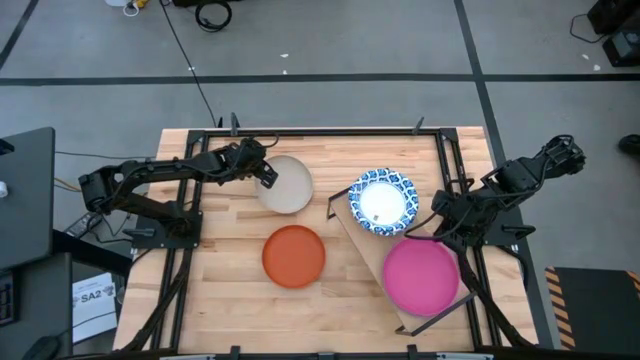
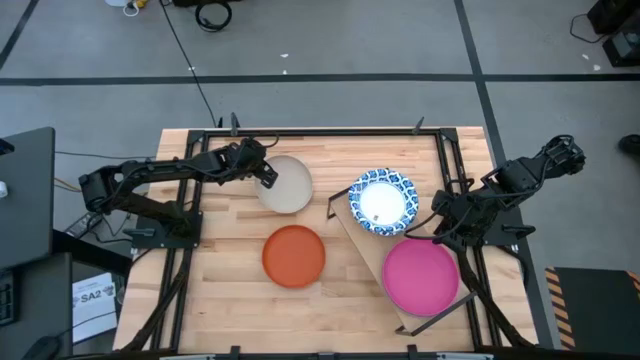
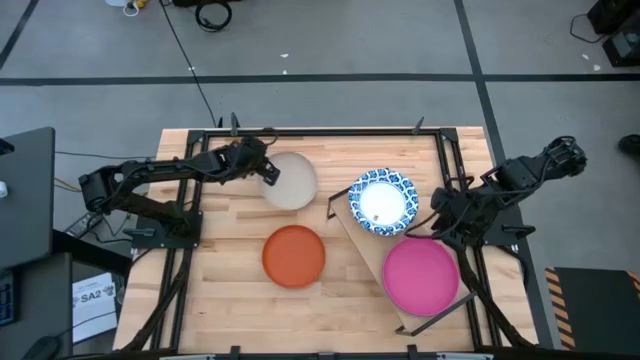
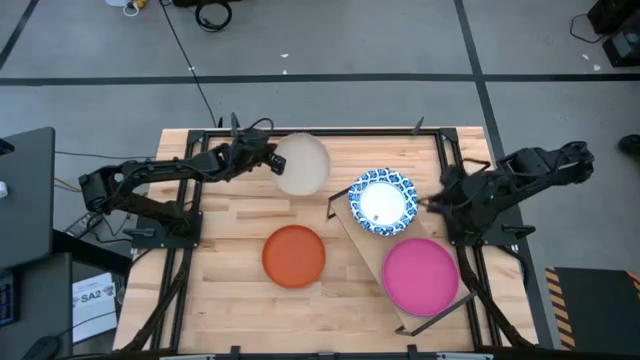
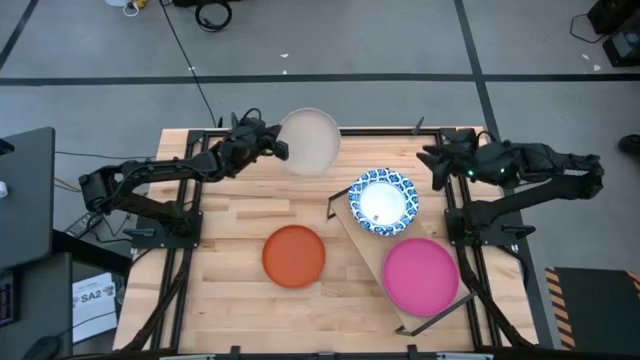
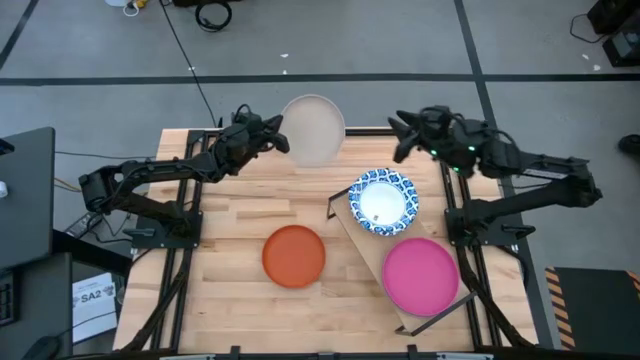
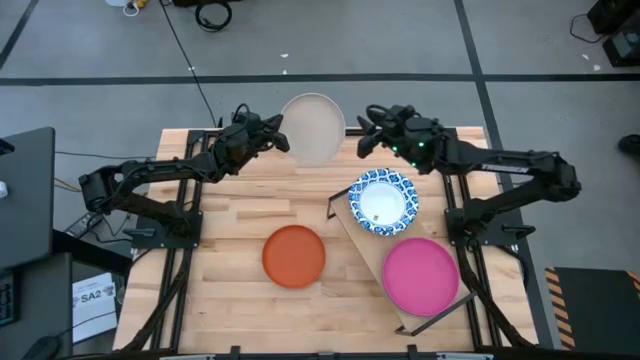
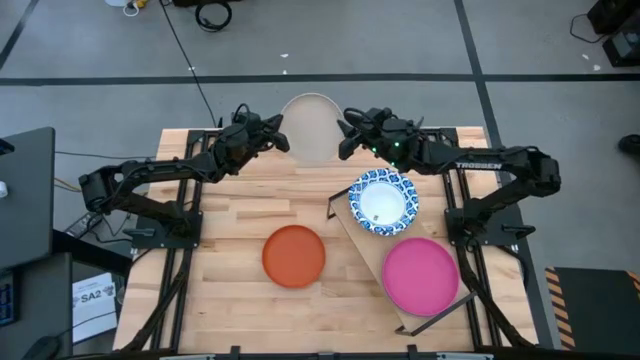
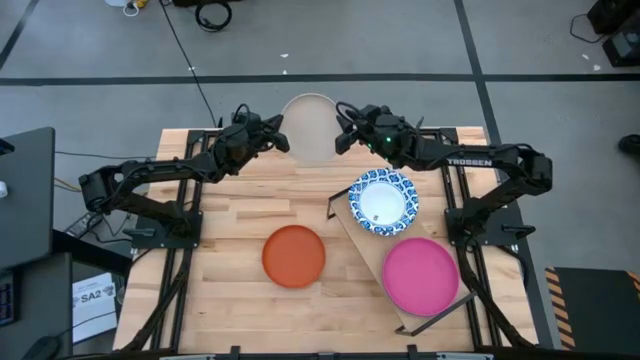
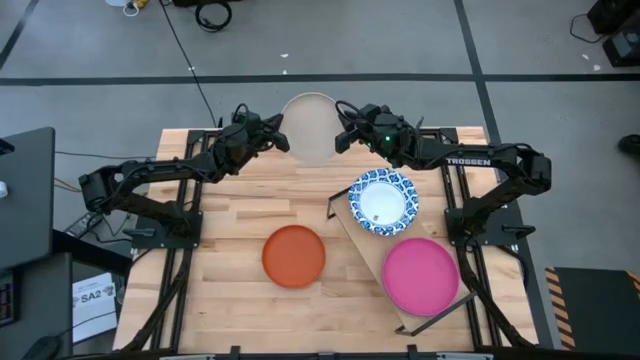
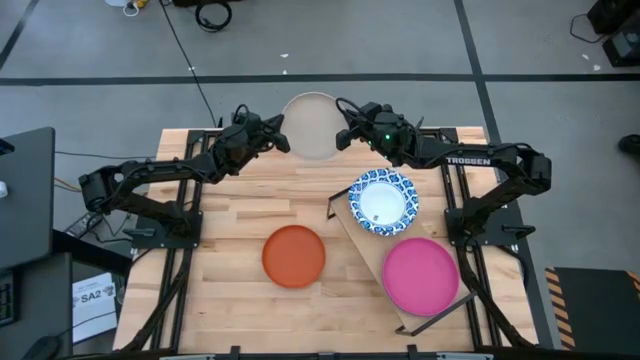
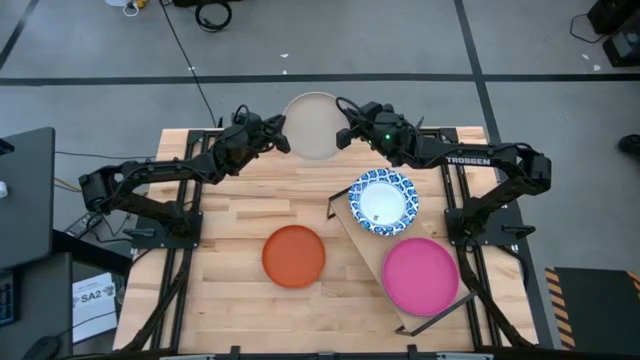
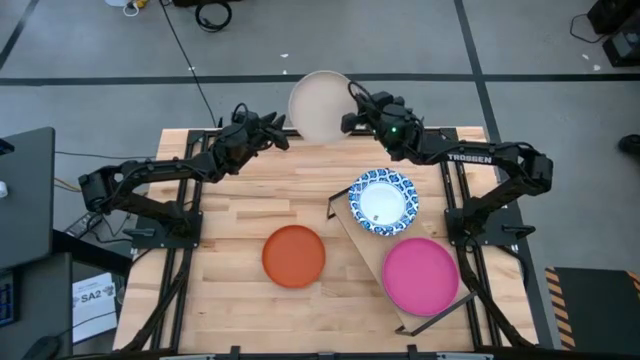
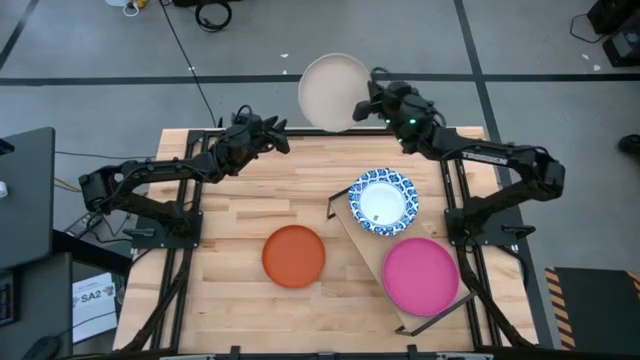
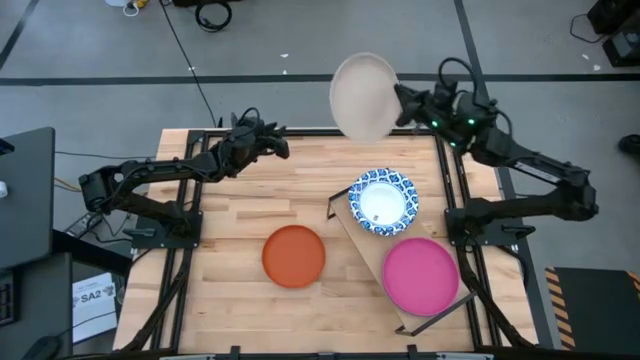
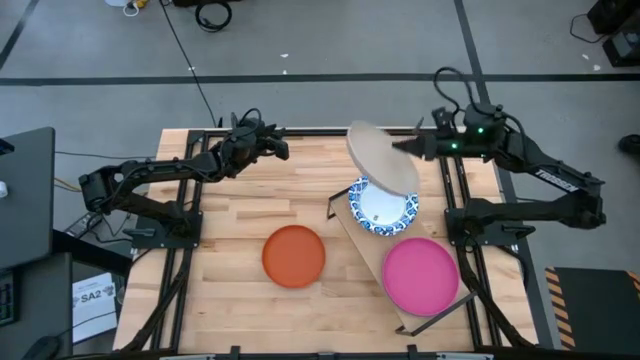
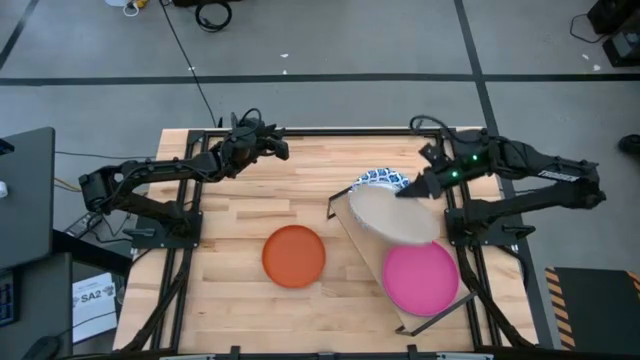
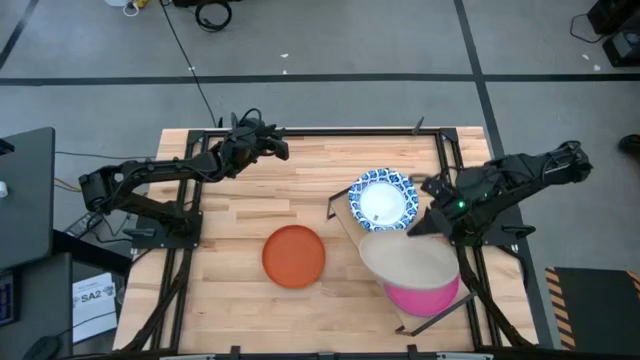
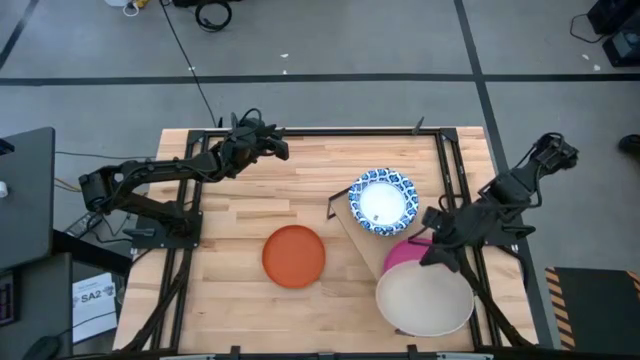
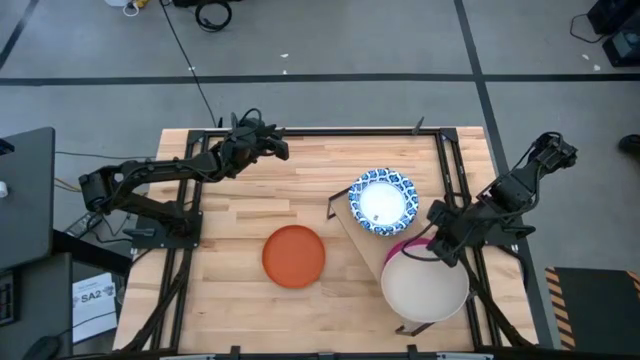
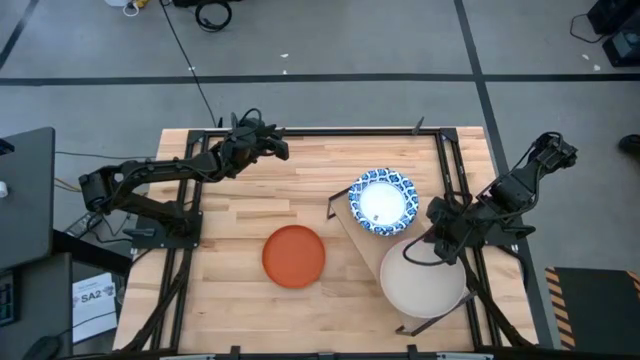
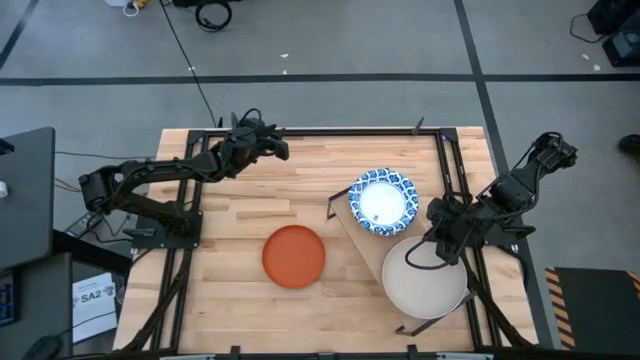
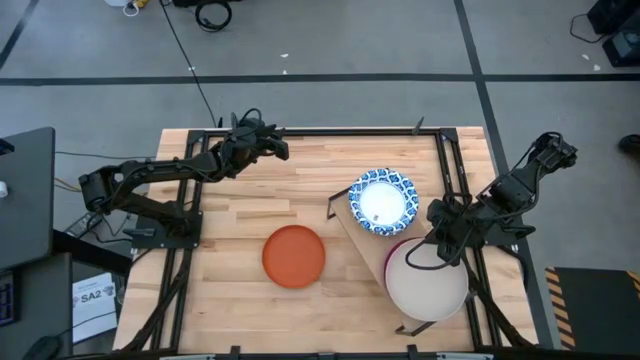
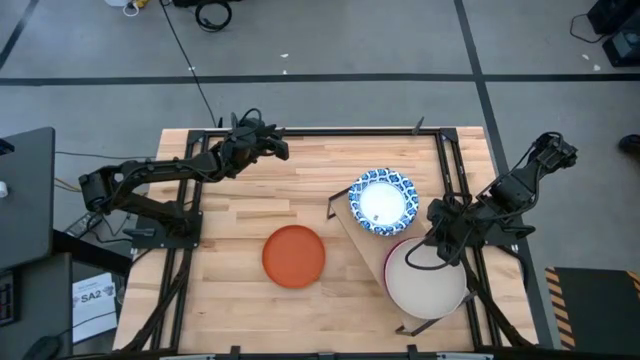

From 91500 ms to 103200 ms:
Task: Place and stack plates onto a shelf
Stack the gray plate on top of the pink plate on the shelf

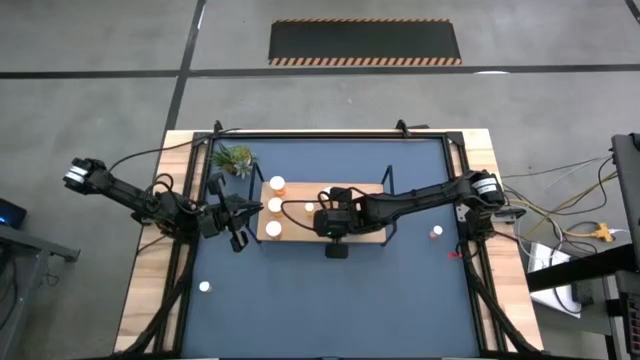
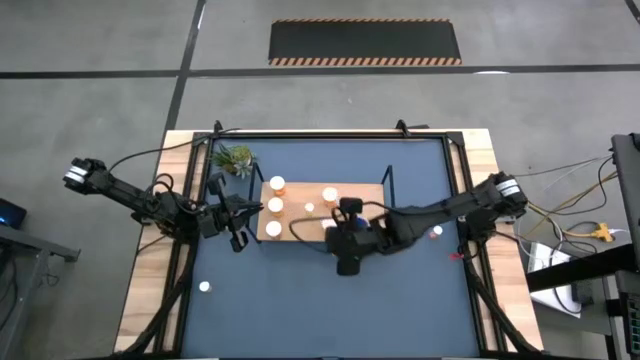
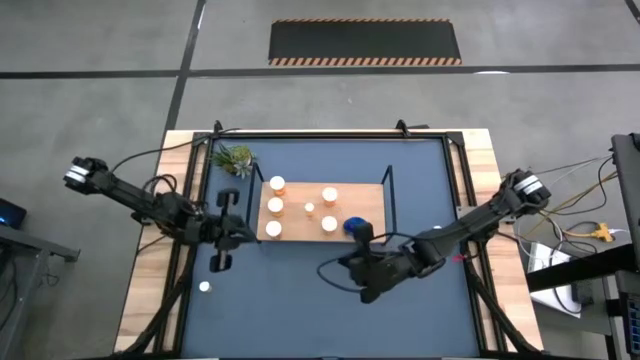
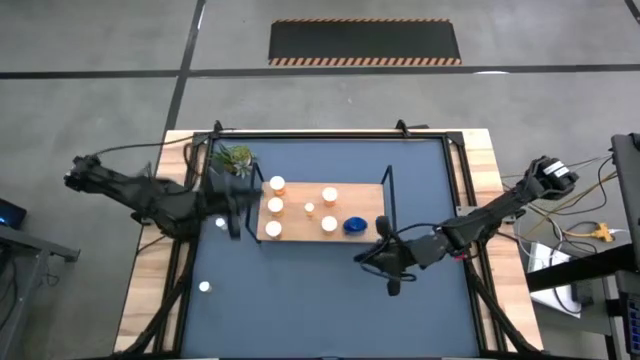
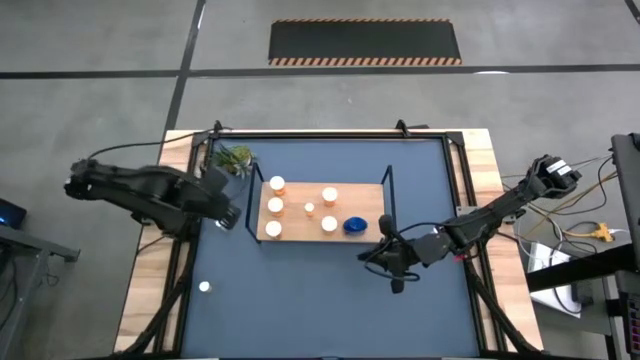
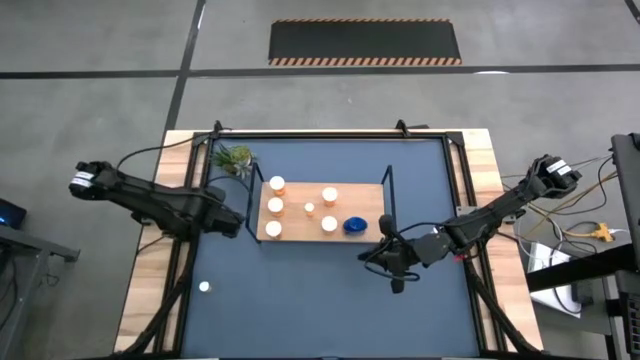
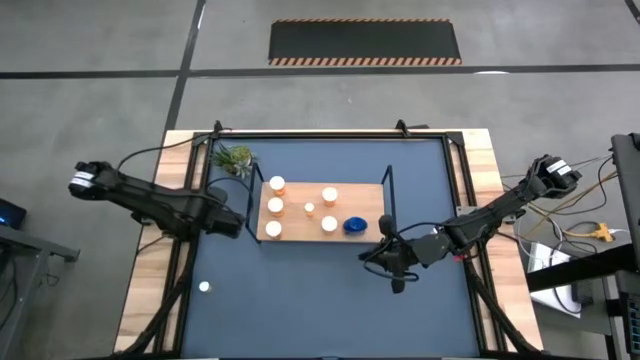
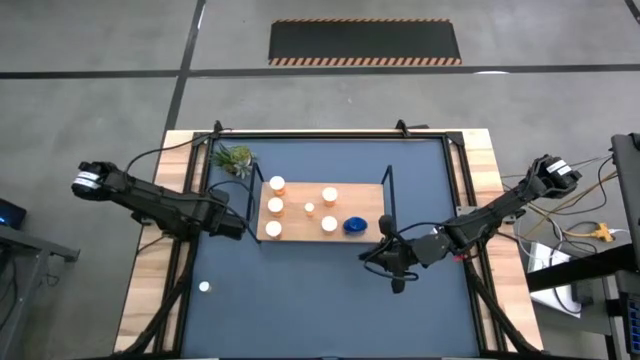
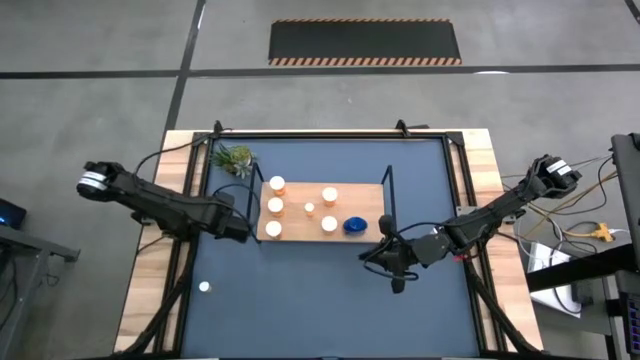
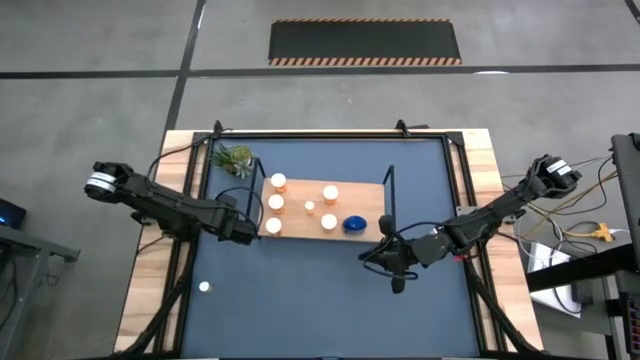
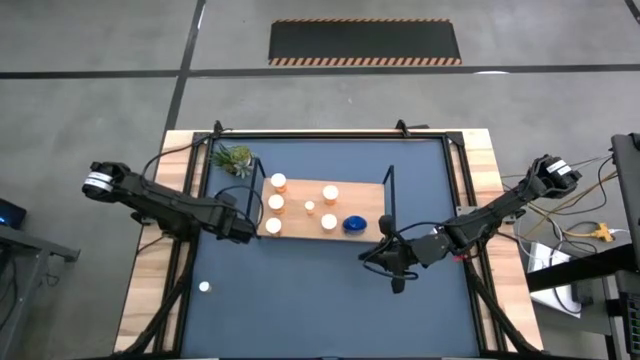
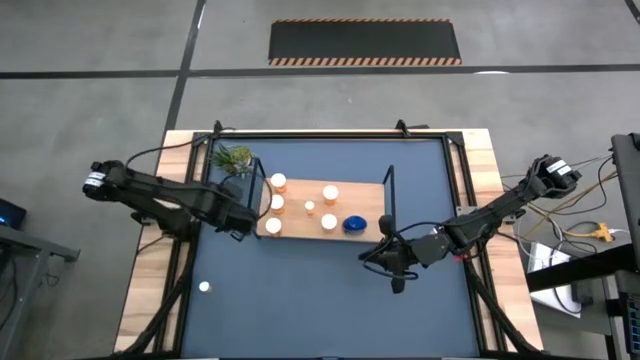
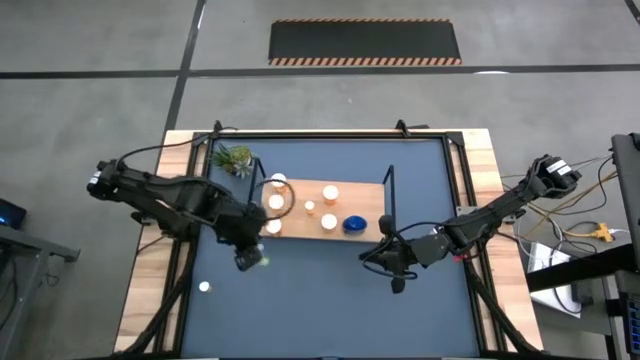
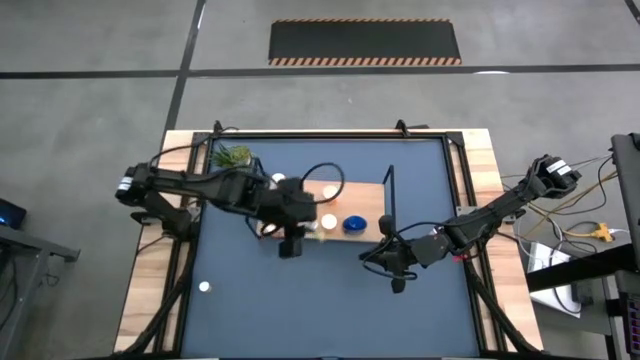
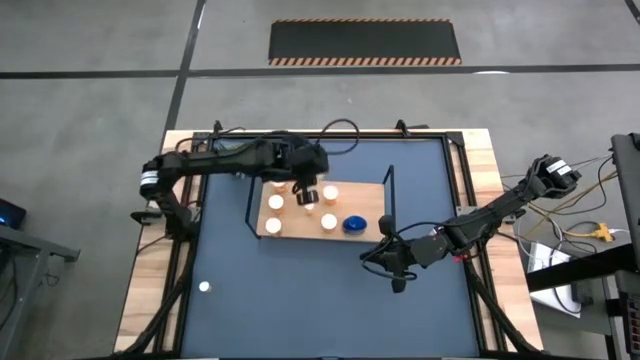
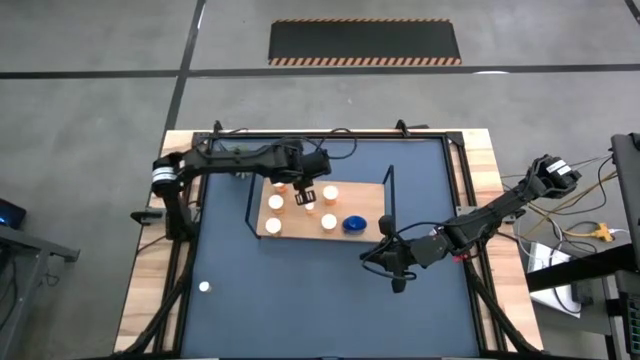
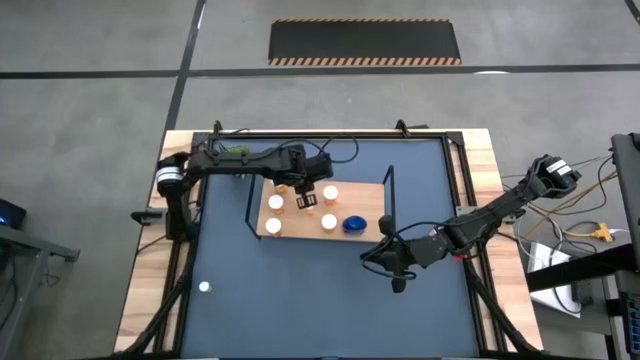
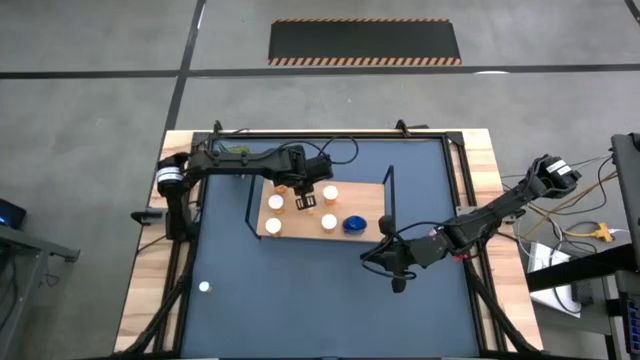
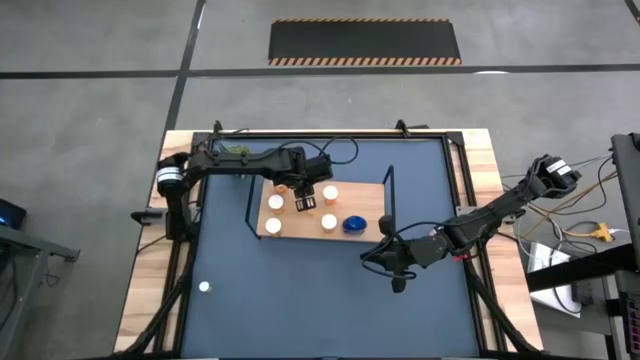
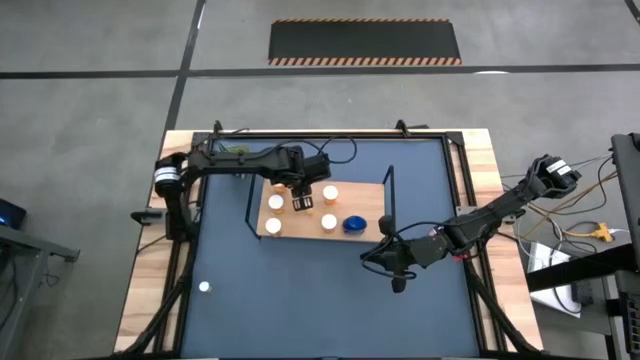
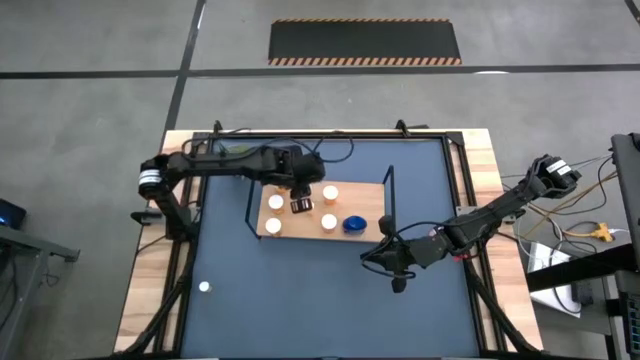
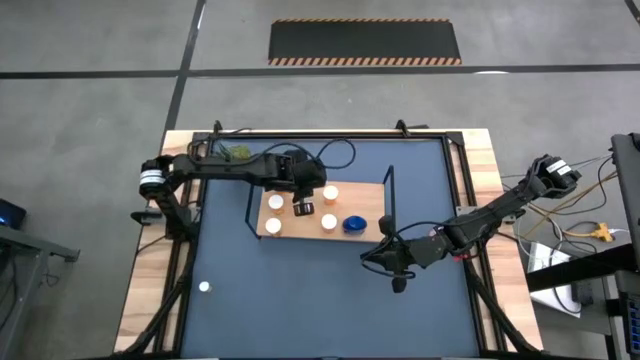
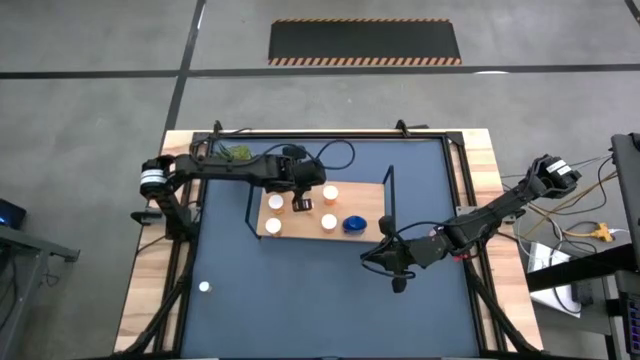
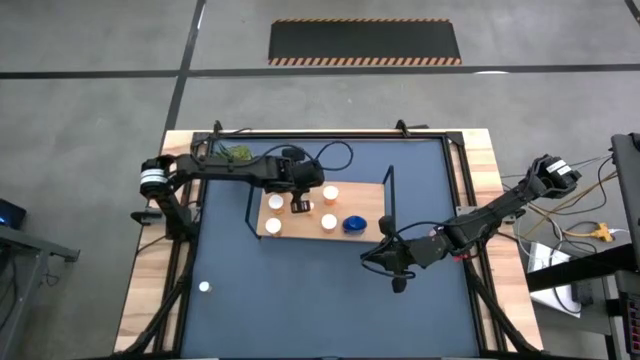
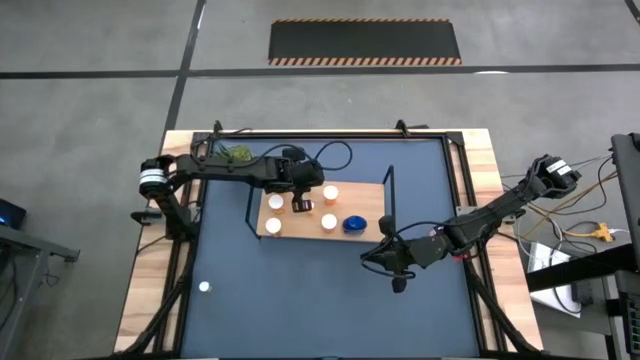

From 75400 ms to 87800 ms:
Task: Pick and place medicine bottles onto shelf by color
Put the yellow pill bottle on to the shelf aligned with the small orange pill bottle
